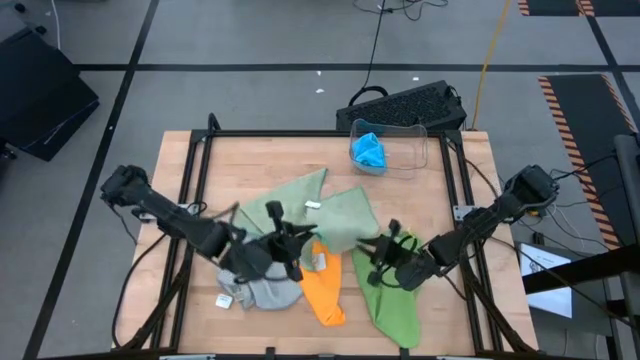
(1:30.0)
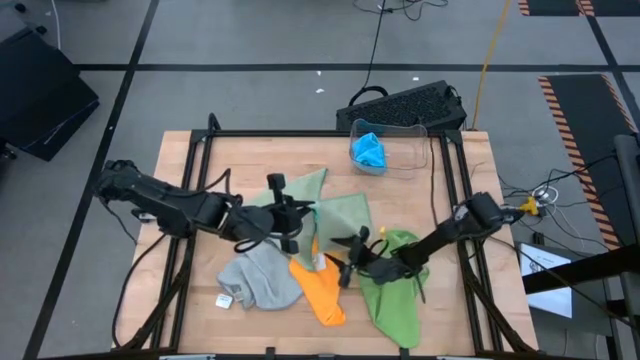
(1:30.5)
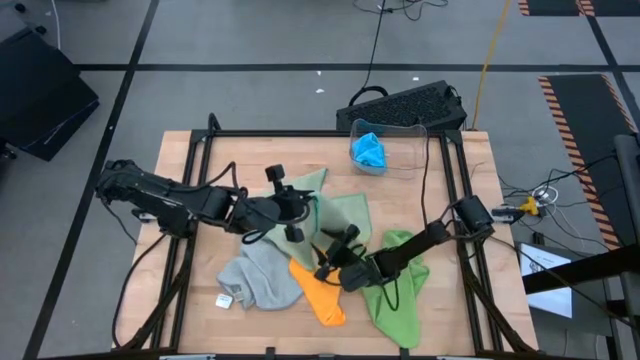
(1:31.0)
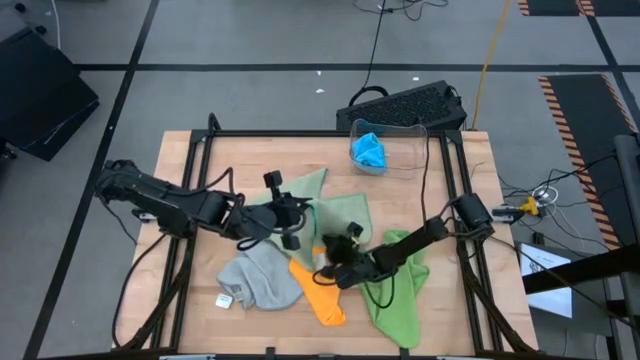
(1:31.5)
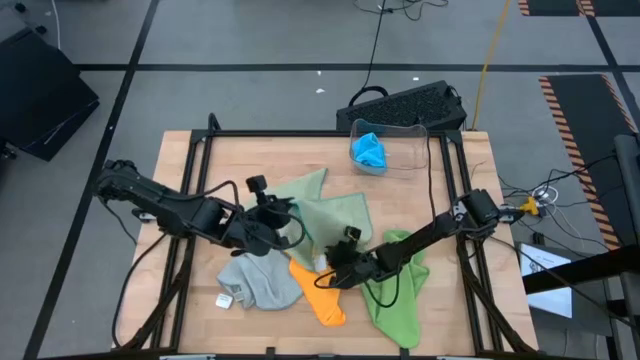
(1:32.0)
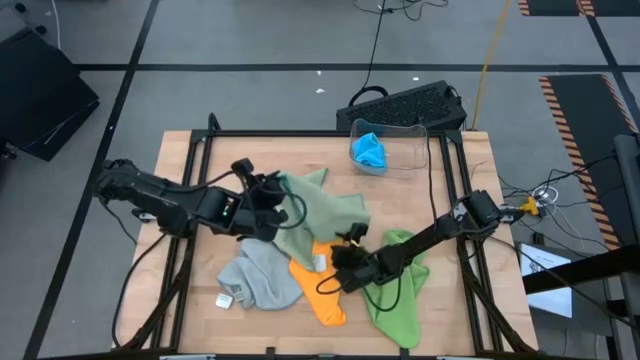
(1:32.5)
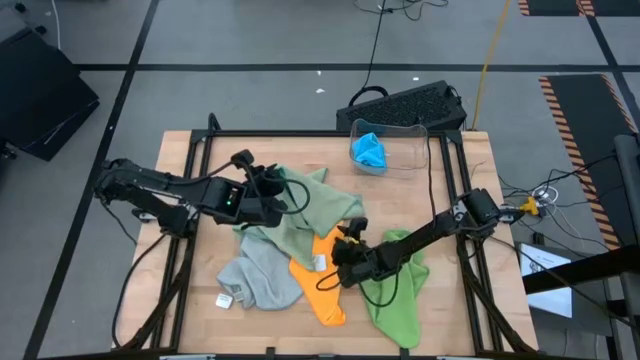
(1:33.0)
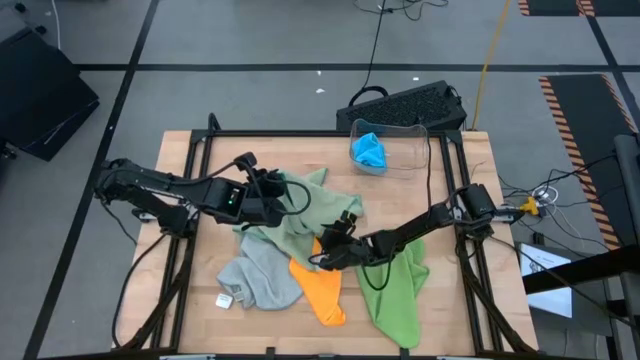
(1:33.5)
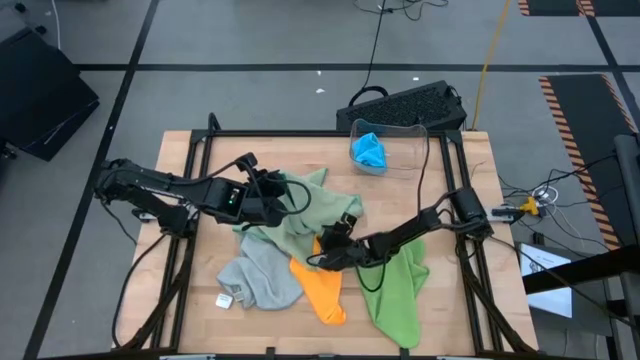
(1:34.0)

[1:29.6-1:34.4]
Task: Fold microfiber towels
Fold the right light green microfiber towel
